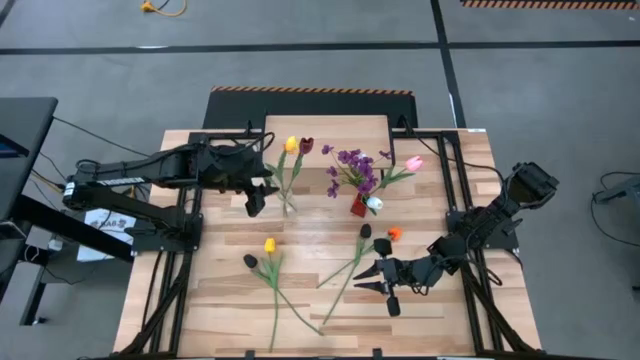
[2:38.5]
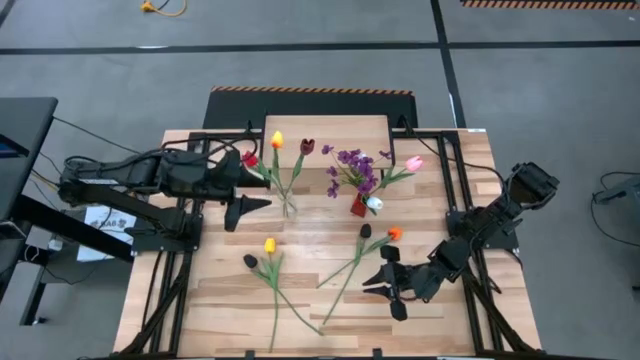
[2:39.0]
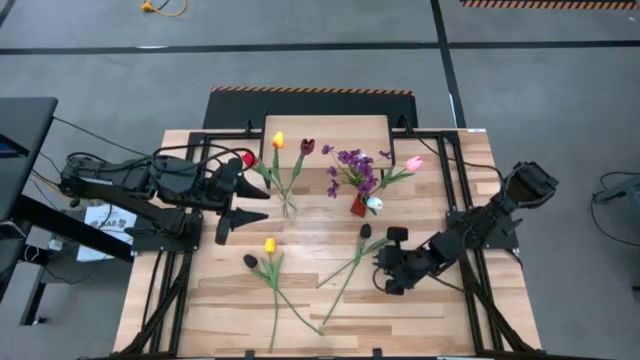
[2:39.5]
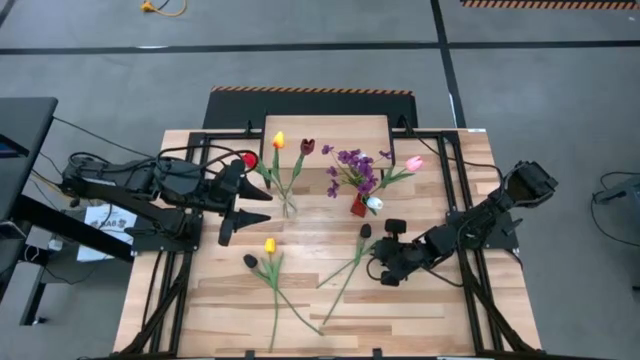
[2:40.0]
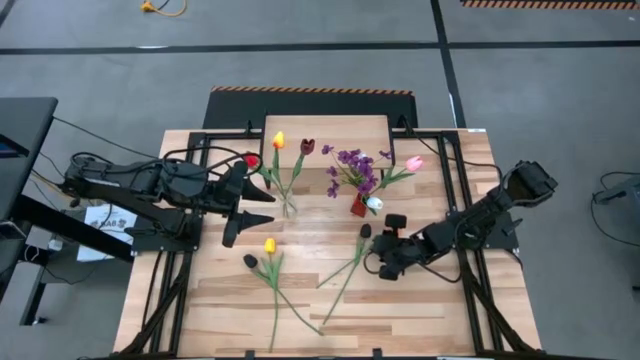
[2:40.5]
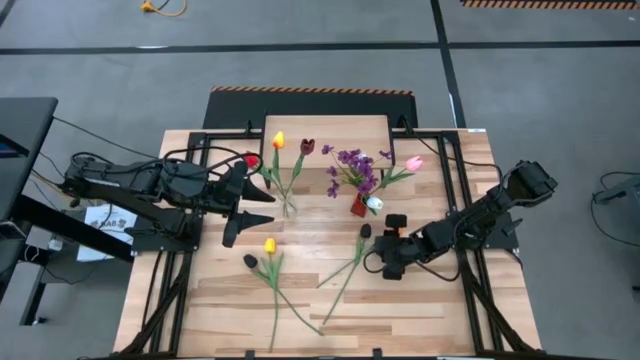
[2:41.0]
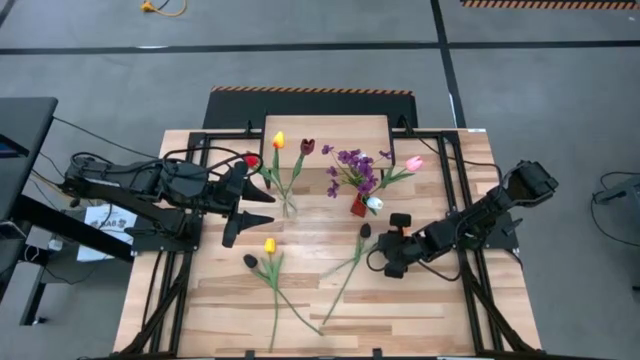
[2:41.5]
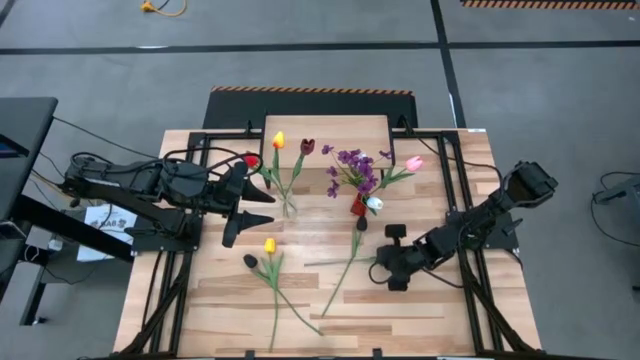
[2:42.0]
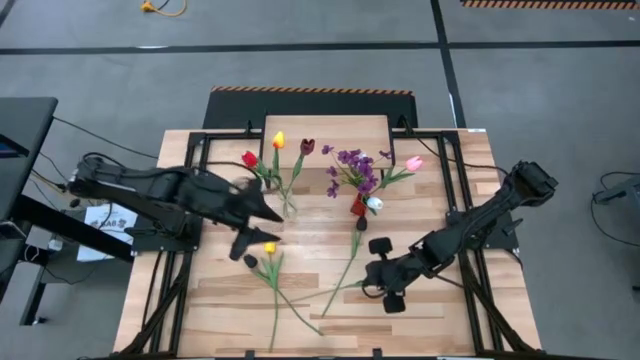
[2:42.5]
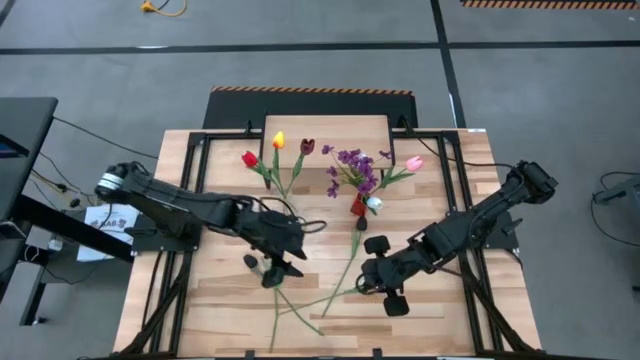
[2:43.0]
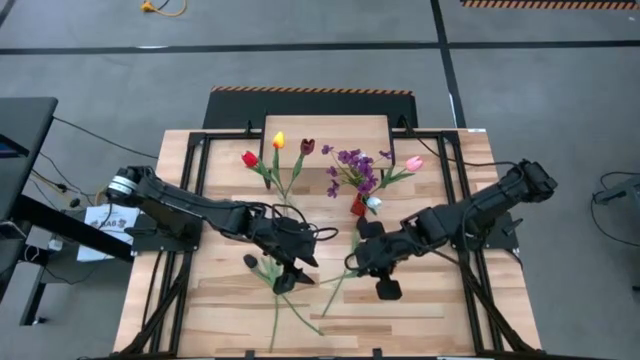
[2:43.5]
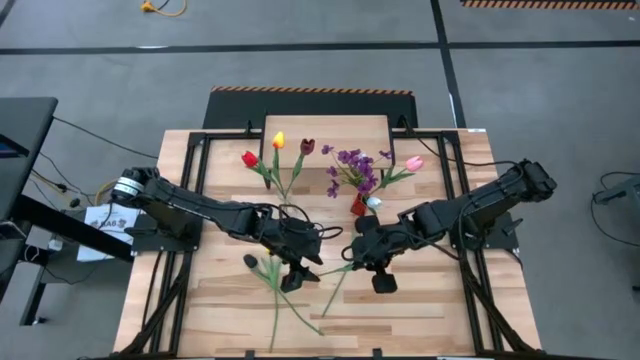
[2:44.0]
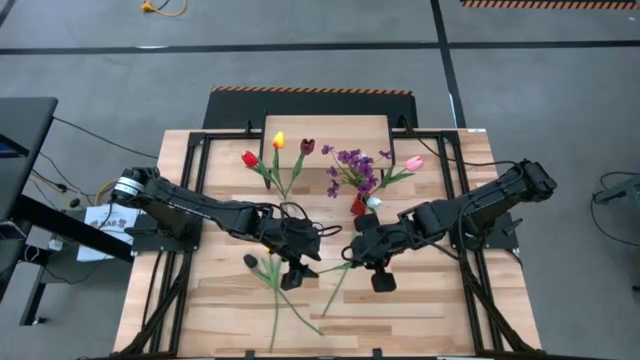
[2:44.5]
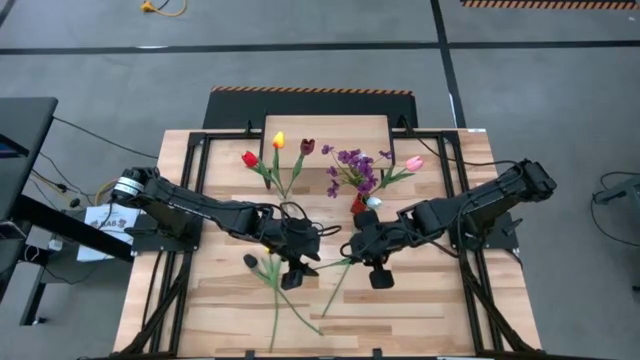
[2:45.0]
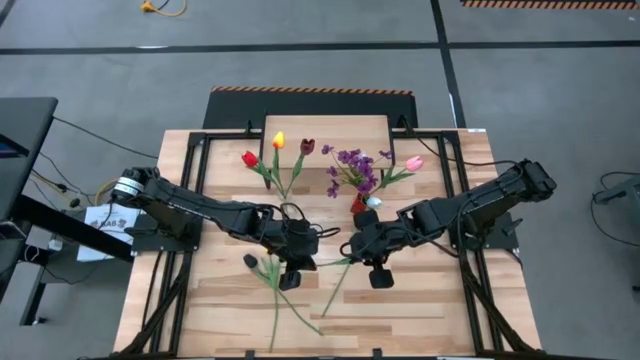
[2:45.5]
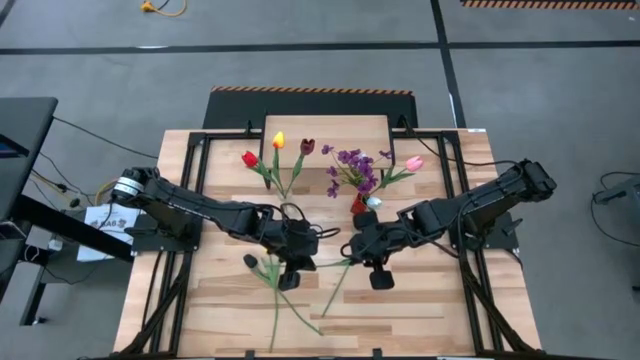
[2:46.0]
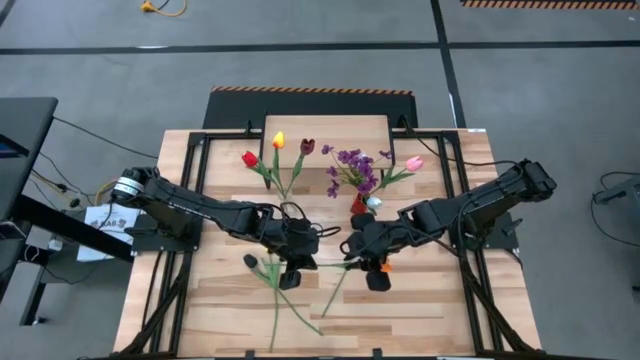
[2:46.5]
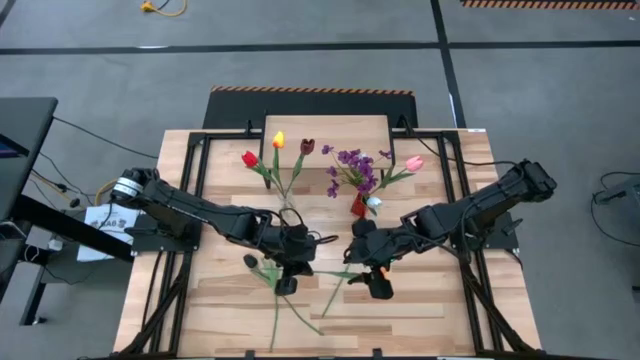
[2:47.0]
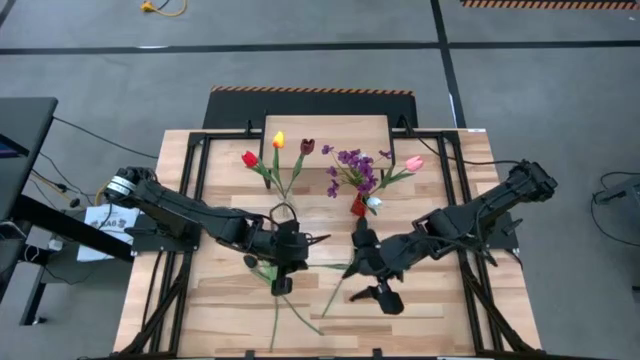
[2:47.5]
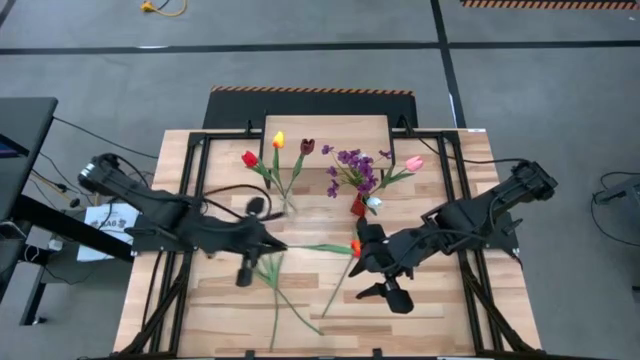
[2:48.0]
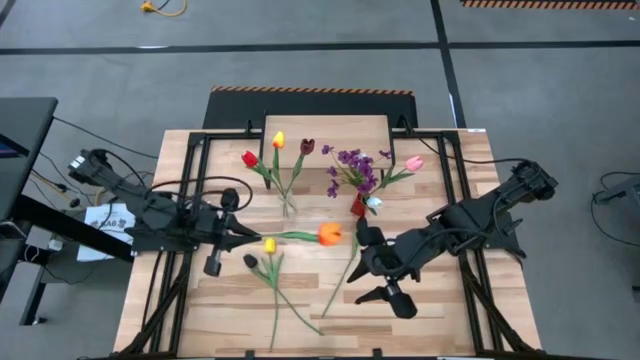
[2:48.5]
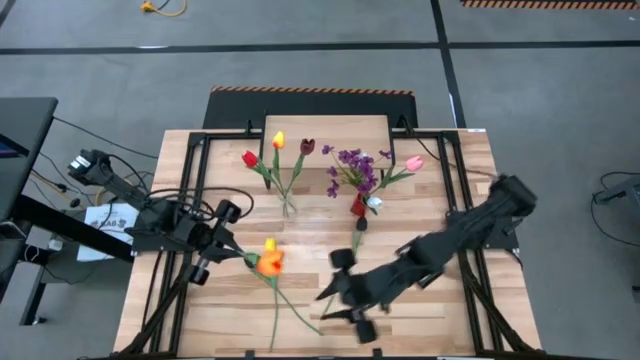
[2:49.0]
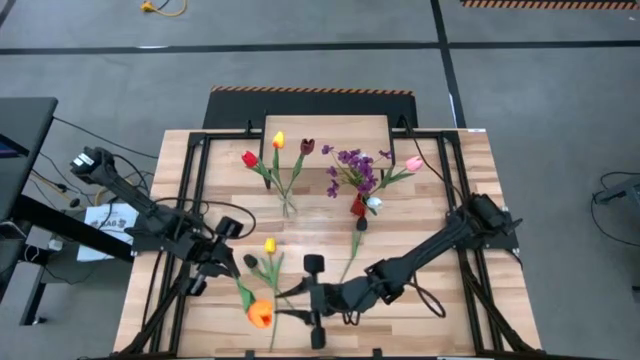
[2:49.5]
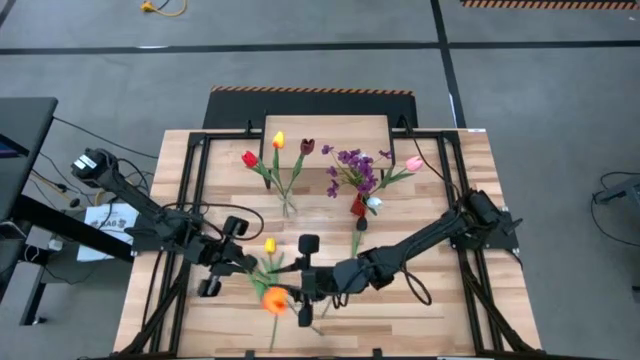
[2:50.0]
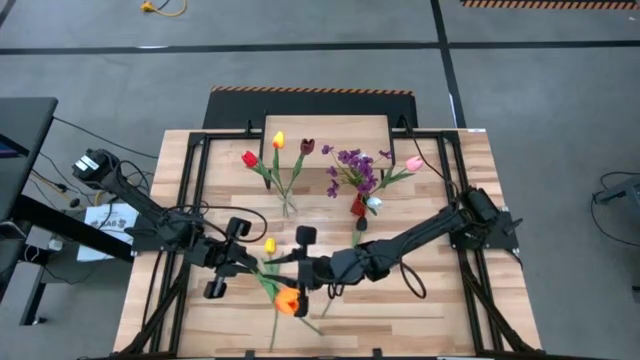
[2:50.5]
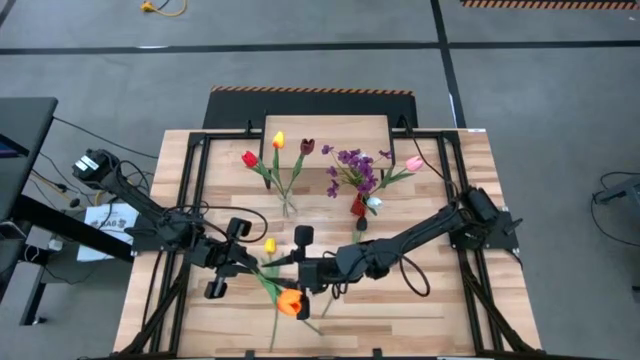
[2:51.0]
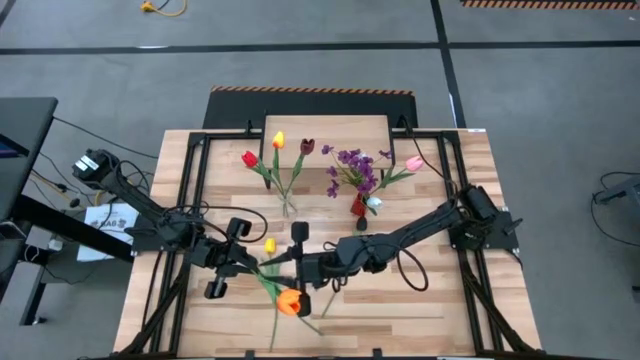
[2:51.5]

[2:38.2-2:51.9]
Task: Pick and place flowers into a vace then onto a shelf
Put the orange flower into the transparent flower vase

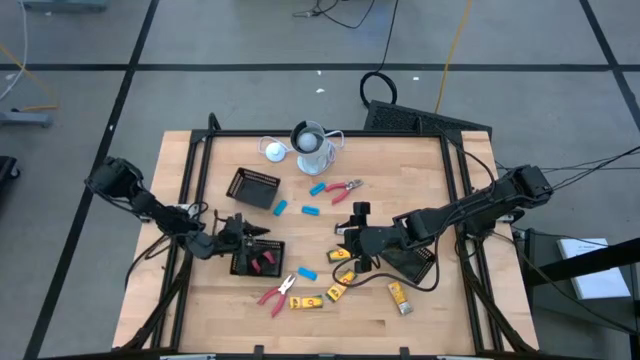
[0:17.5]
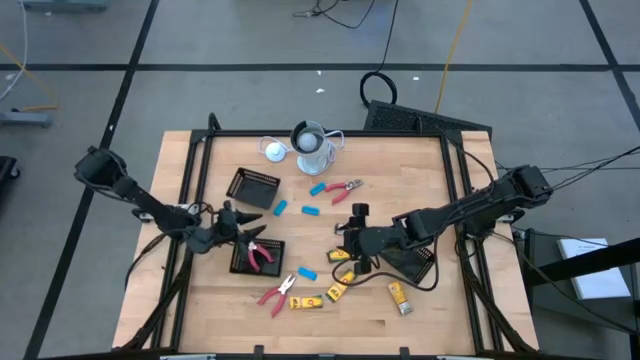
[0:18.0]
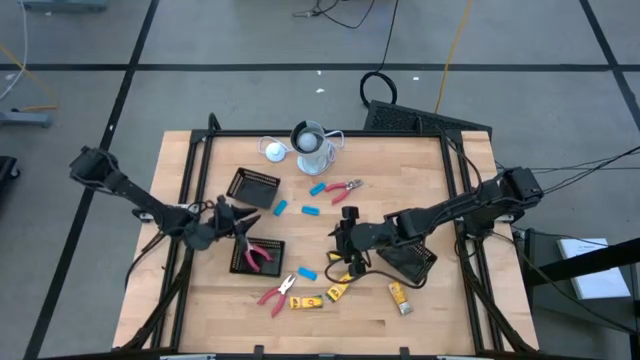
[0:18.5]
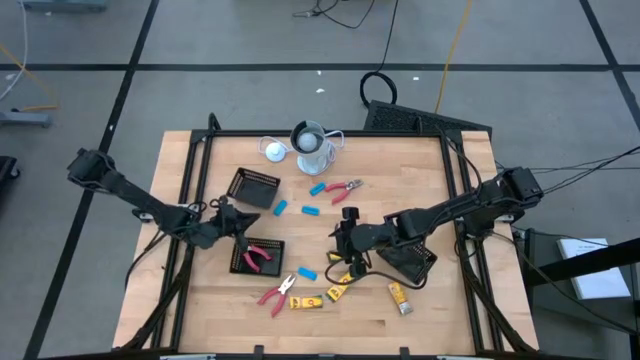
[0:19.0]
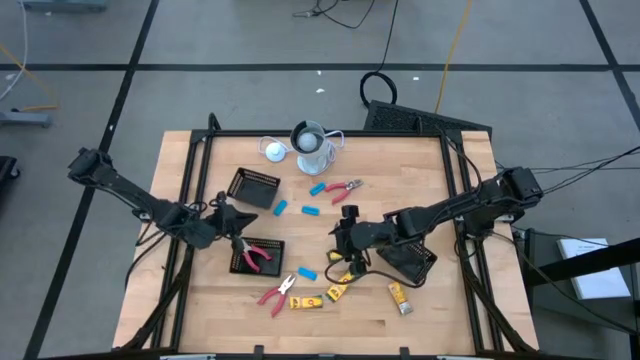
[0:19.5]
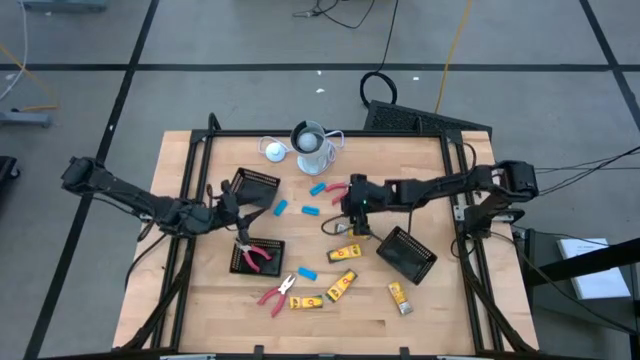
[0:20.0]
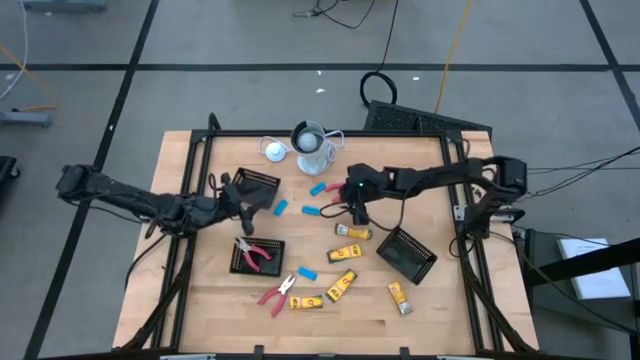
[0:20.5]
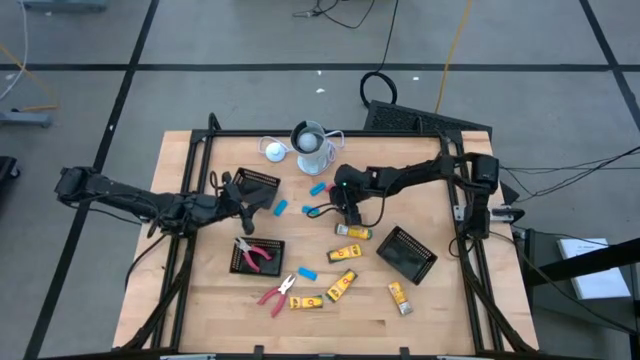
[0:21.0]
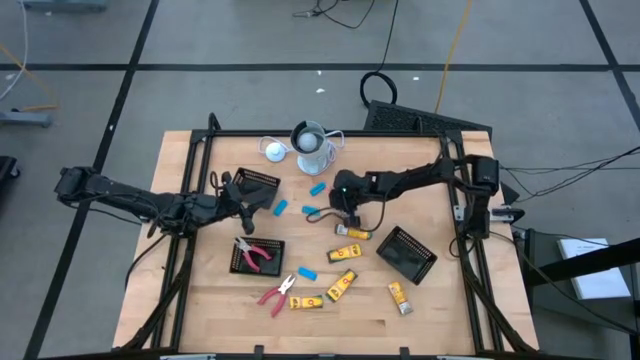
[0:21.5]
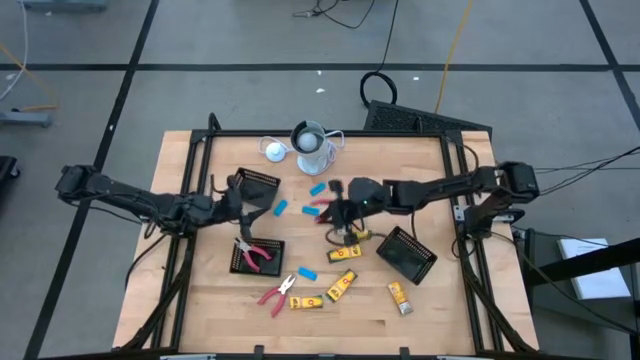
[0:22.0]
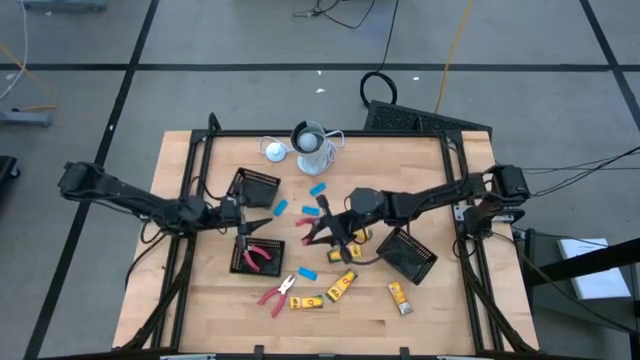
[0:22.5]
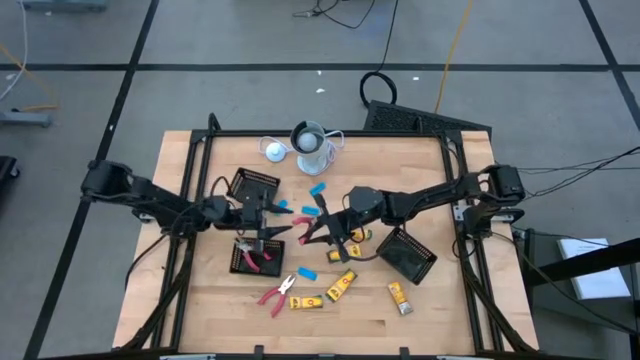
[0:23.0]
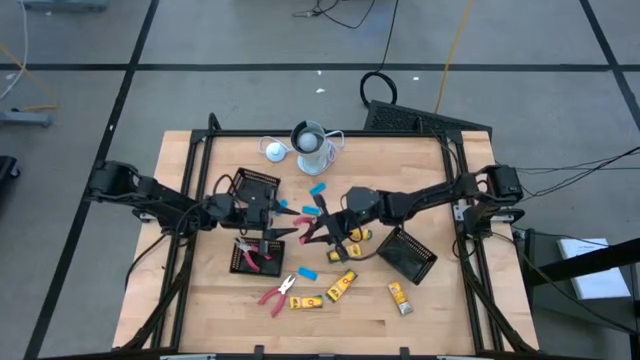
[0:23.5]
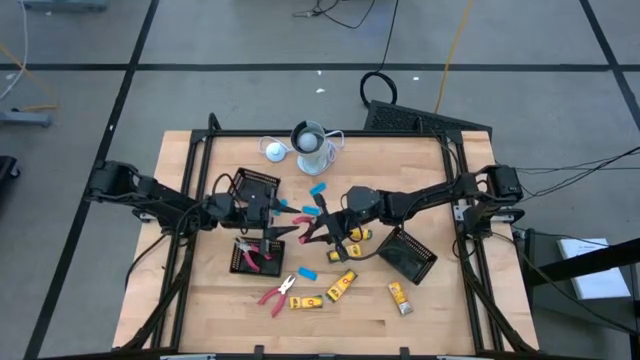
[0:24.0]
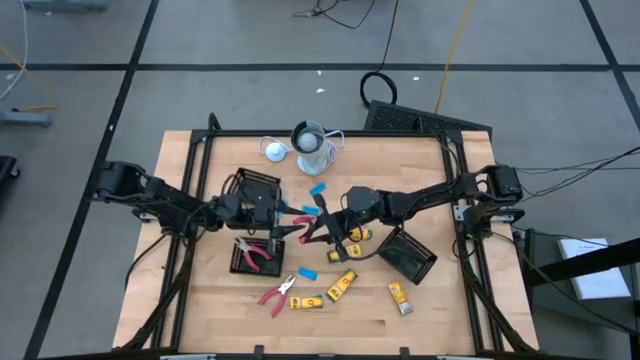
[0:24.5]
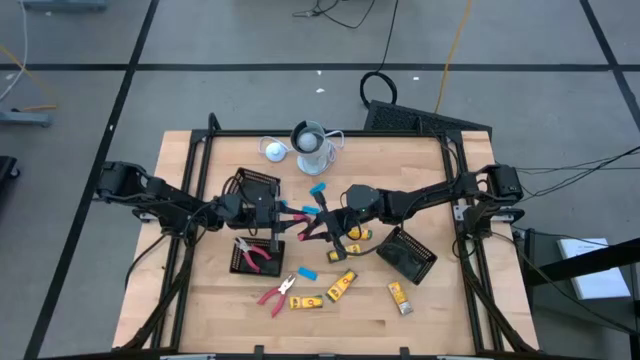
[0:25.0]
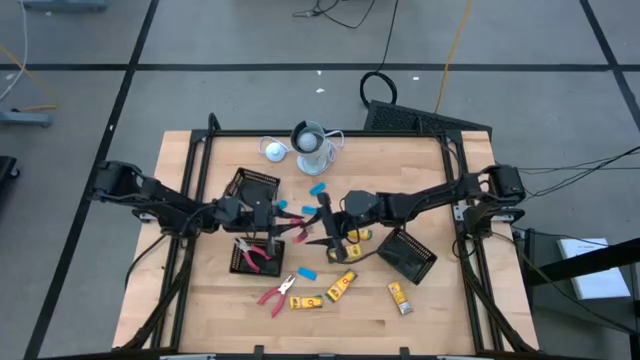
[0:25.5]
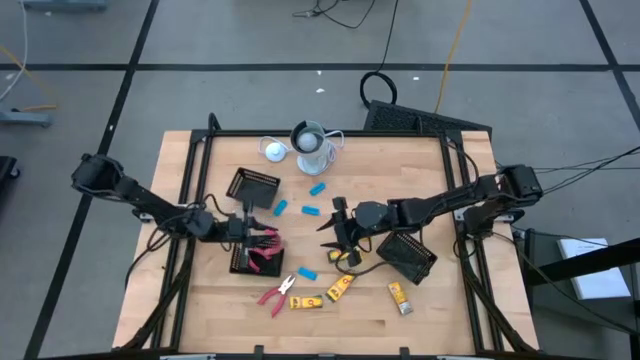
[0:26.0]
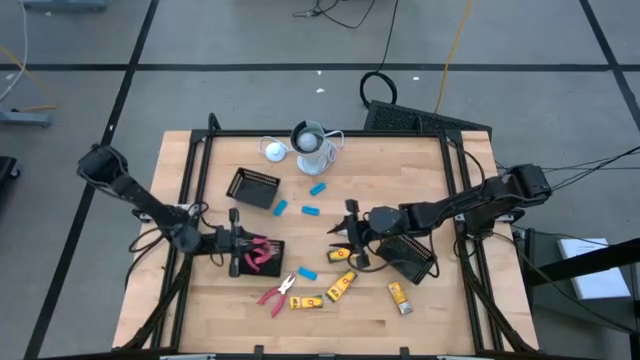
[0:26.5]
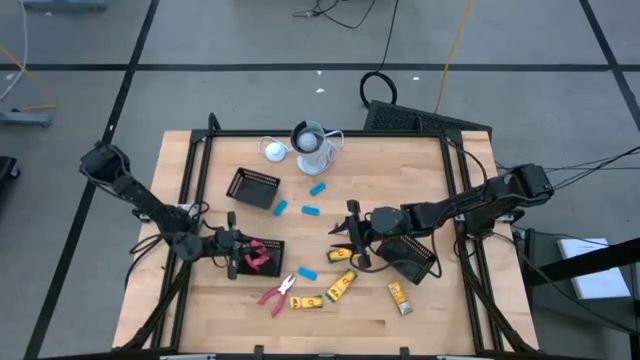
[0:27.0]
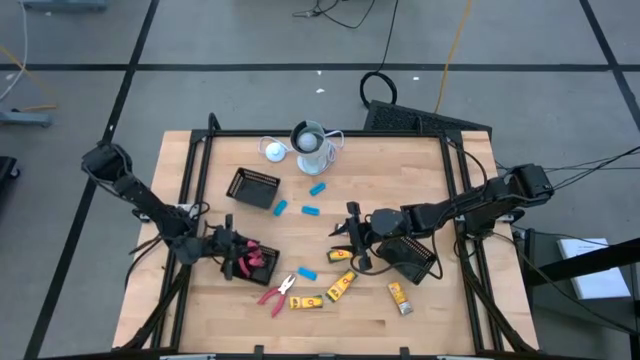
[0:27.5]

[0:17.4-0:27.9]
Task: Pick & Place School Supplies
Put the pink hole puncher into the bottom left black bin
